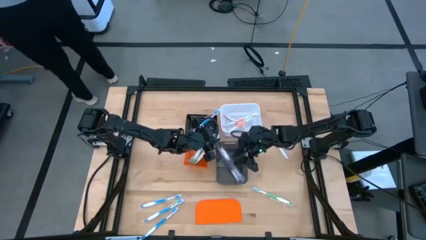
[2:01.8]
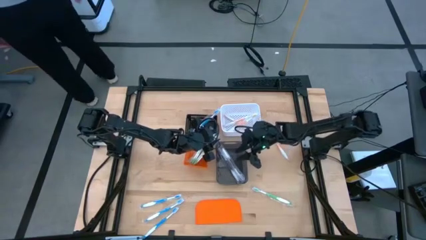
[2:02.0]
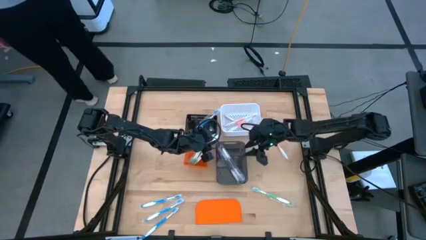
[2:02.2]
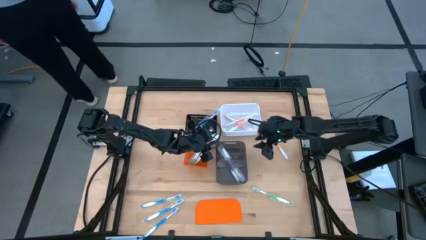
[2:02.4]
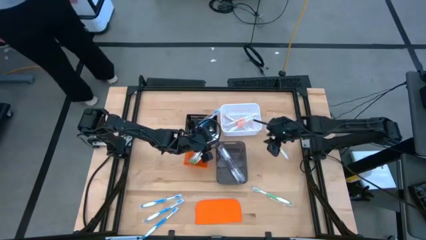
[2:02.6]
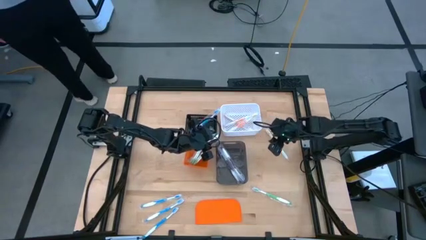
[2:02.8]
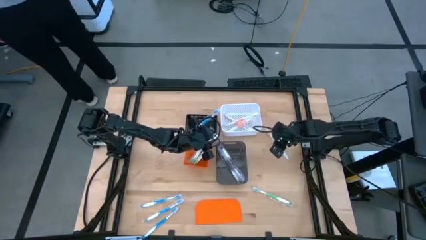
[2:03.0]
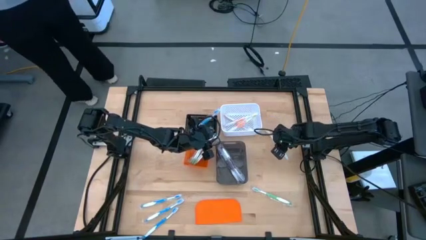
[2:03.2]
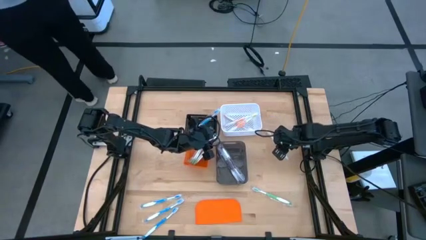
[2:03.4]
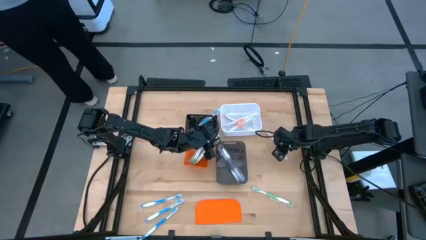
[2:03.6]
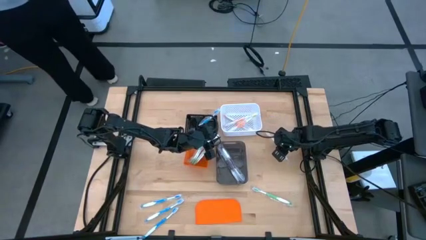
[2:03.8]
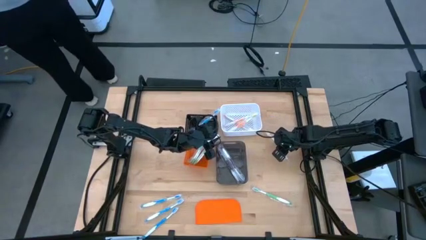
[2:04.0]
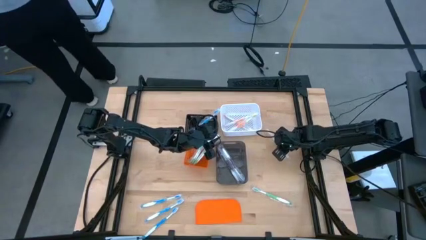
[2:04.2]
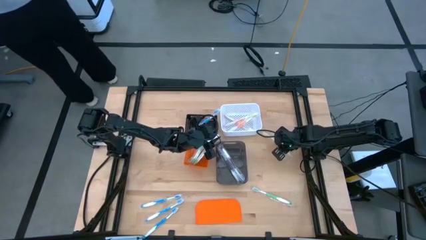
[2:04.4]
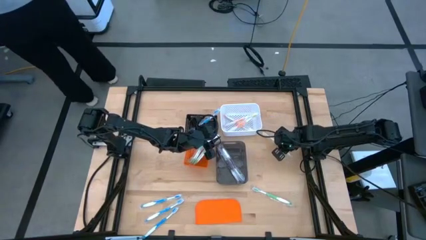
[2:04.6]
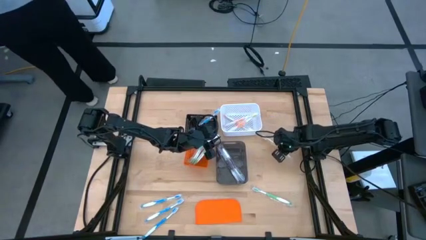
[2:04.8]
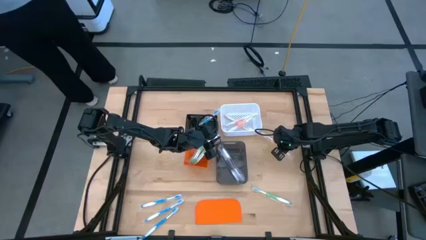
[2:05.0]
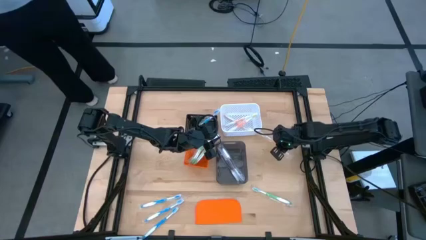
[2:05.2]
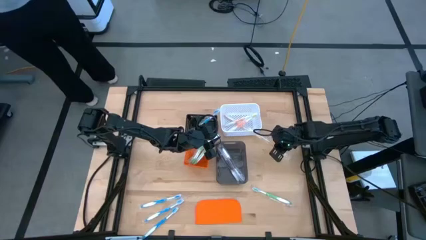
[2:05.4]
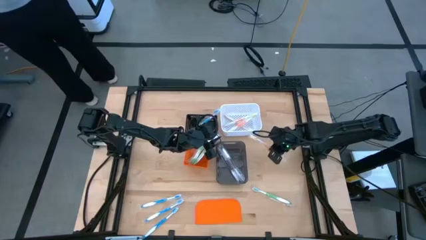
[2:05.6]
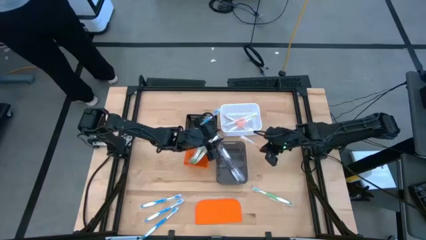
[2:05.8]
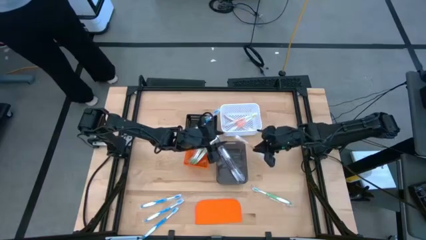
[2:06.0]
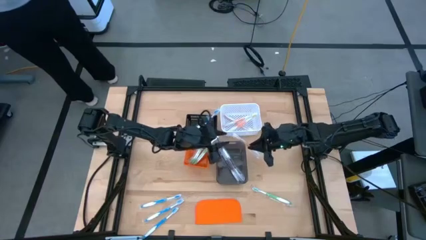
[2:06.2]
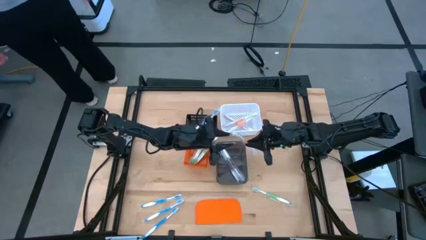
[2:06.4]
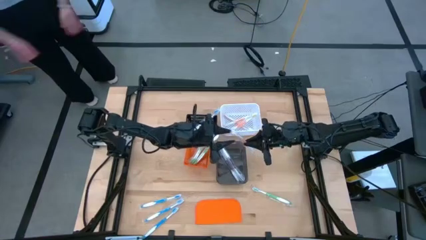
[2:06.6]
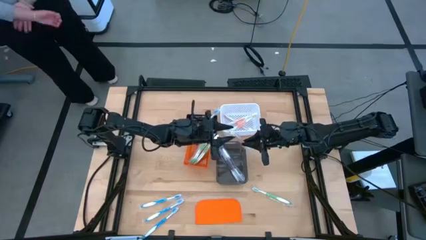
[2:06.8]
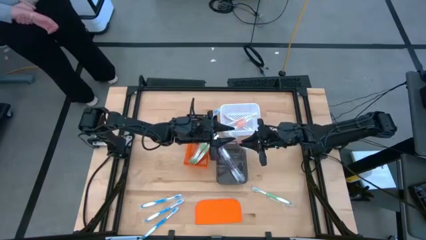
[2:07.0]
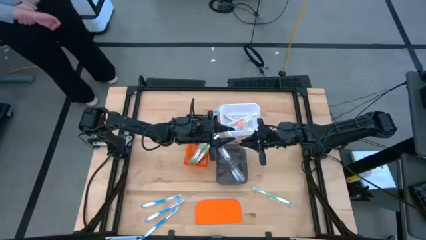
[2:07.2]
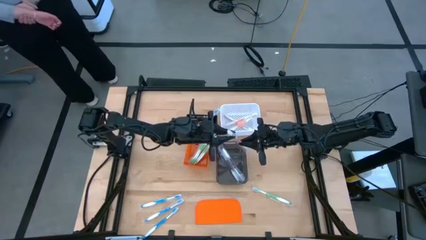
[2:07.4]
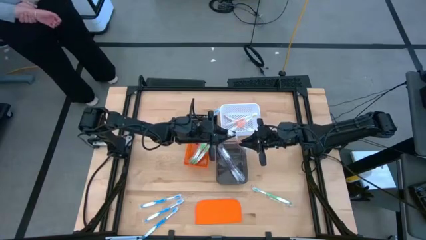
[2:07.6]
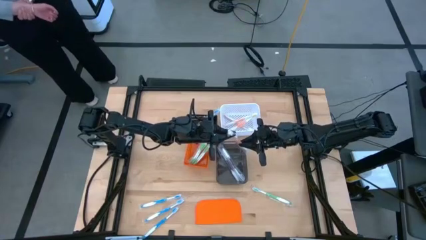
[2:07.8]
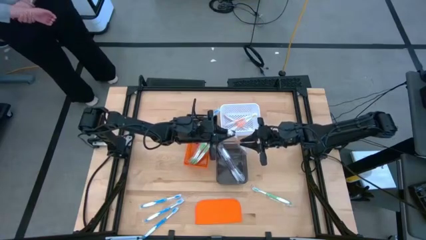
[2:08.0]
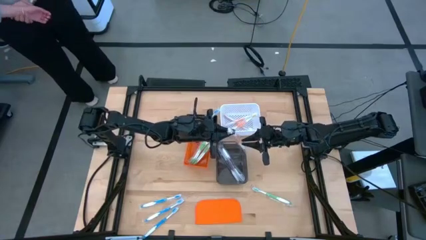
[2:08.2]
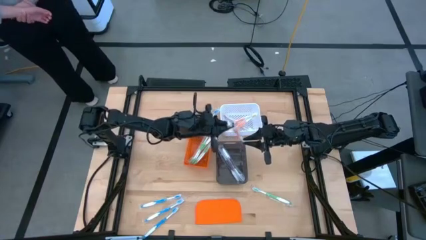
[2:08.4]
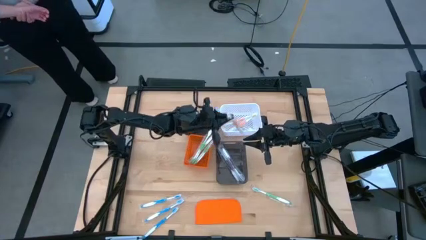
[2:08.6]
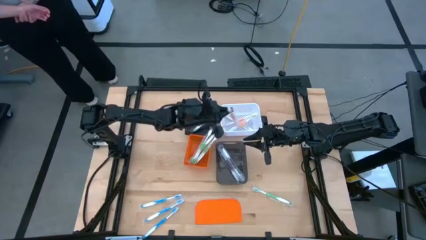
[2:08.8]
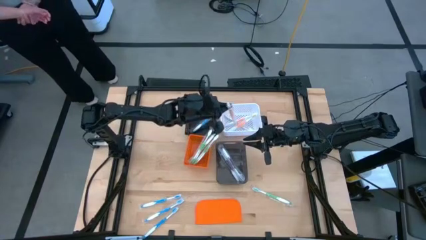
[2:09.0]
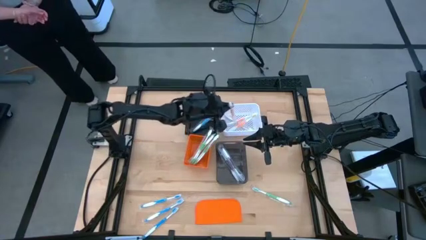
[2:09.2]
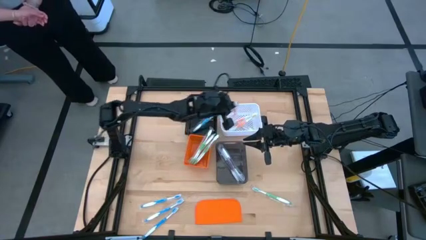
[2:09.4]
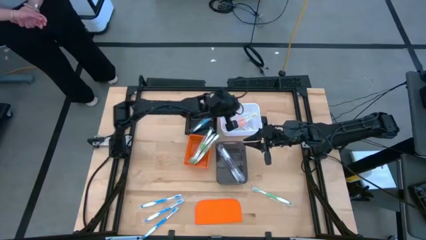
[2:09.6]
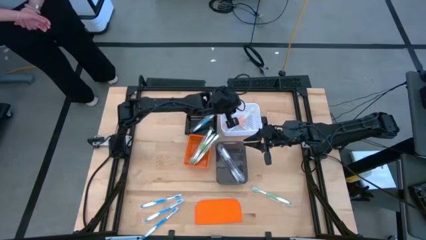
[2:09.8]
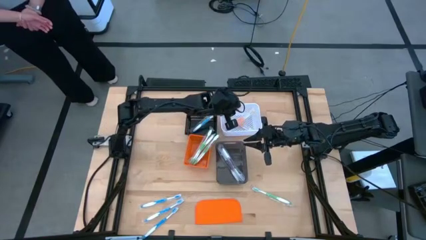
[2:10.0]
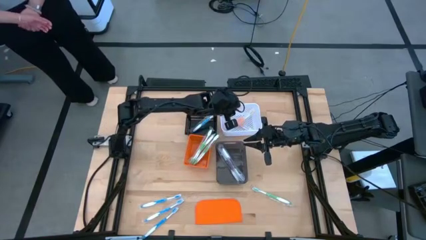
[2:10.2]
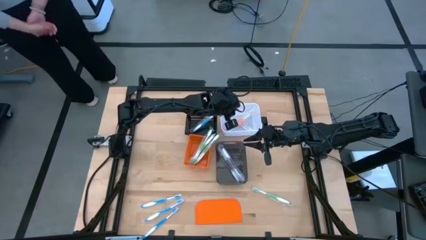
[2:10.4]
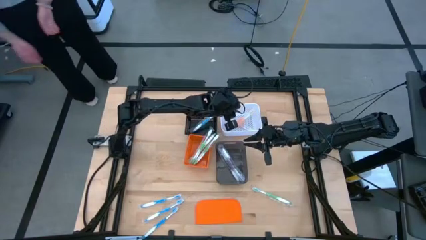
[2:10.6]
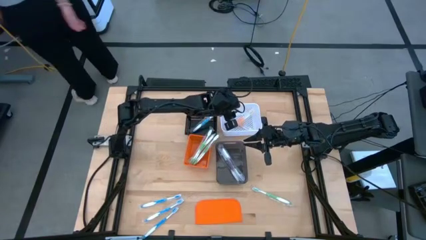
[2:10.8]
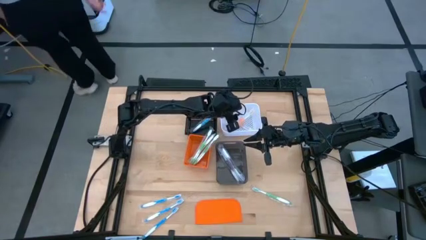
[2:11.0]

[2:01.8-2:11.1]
Task: Pick & Place Toothbrushes
Put the orange toothbrush into the white bin

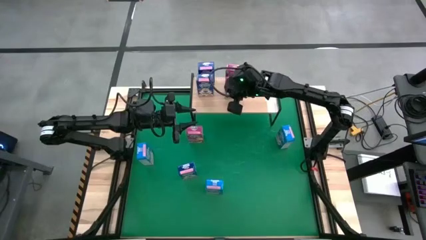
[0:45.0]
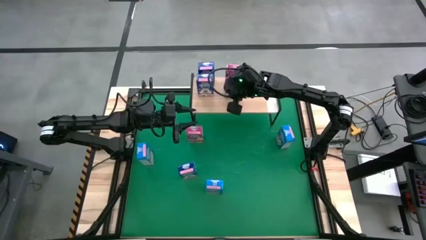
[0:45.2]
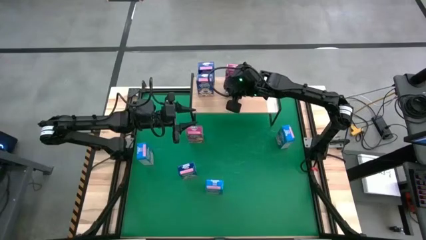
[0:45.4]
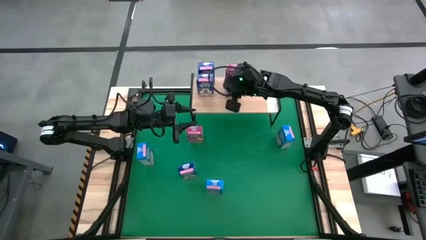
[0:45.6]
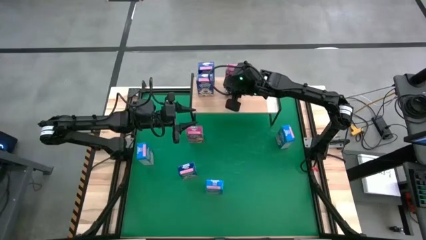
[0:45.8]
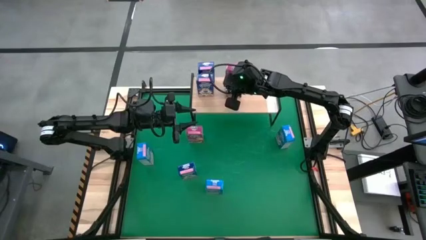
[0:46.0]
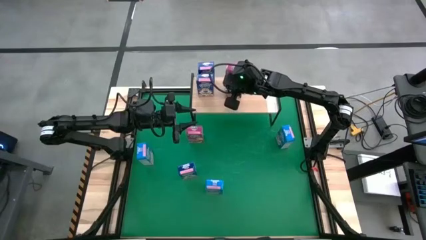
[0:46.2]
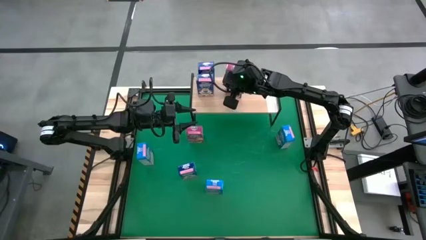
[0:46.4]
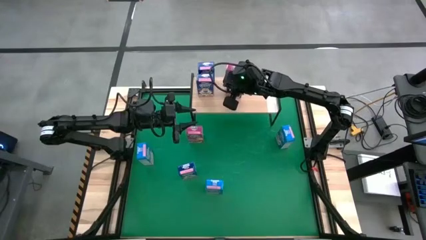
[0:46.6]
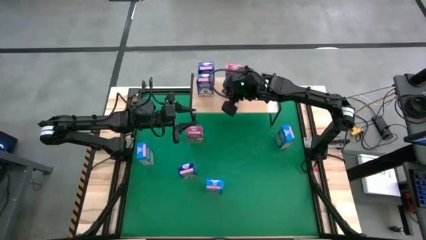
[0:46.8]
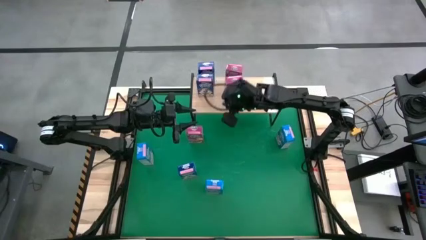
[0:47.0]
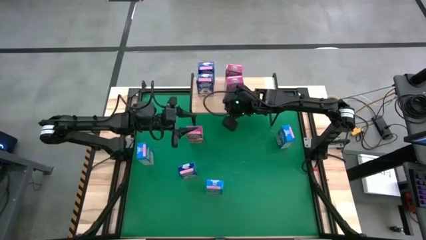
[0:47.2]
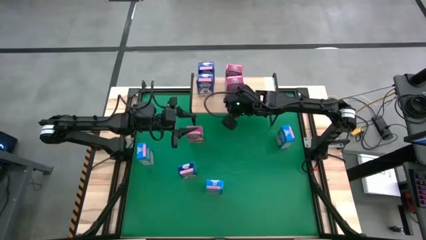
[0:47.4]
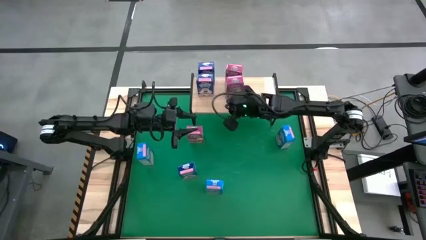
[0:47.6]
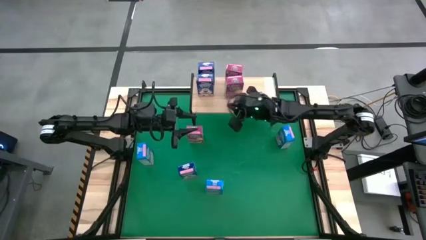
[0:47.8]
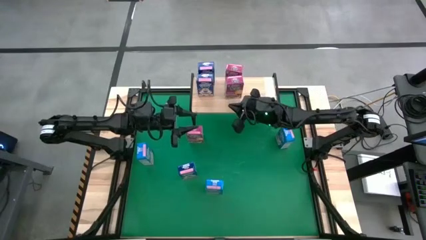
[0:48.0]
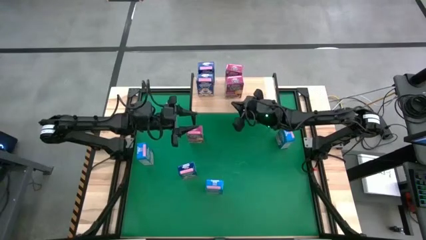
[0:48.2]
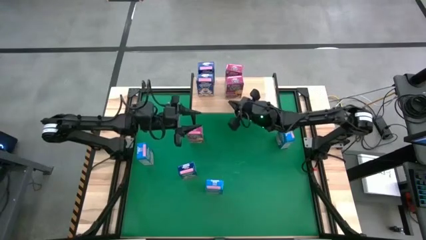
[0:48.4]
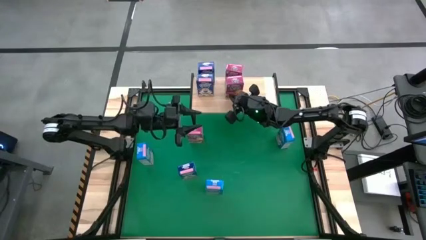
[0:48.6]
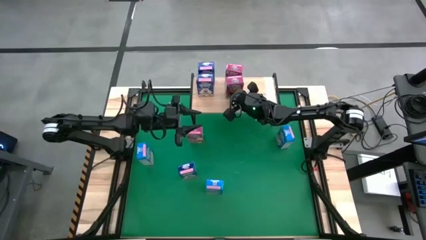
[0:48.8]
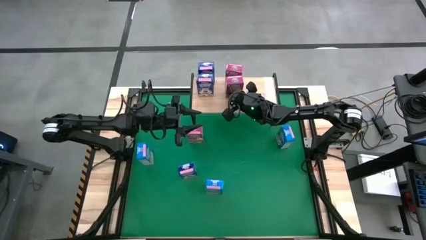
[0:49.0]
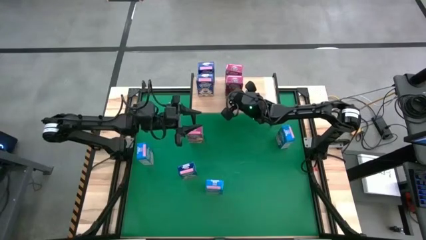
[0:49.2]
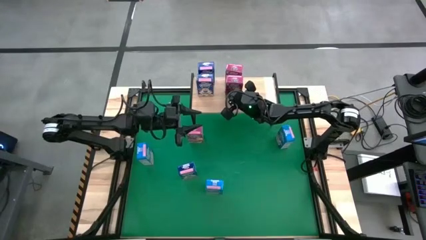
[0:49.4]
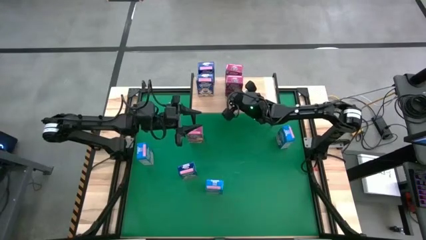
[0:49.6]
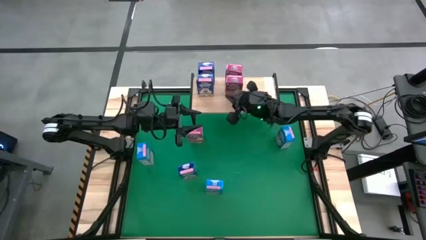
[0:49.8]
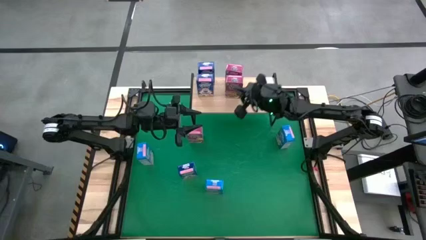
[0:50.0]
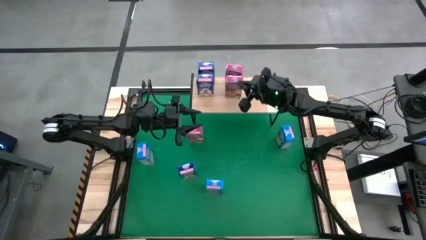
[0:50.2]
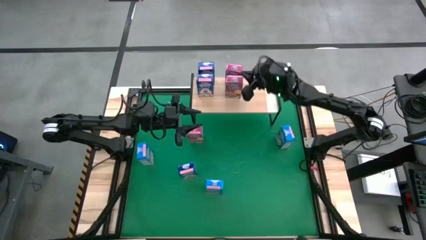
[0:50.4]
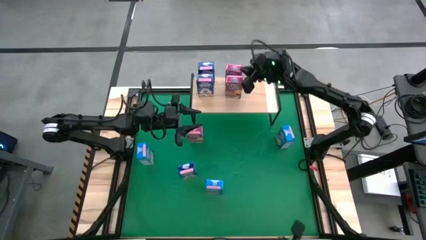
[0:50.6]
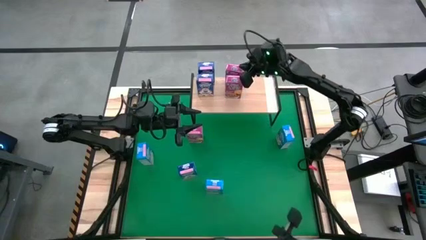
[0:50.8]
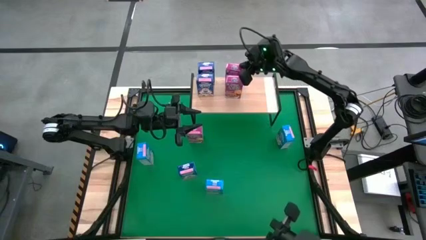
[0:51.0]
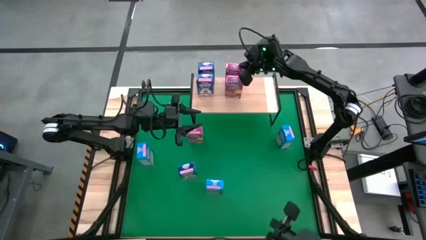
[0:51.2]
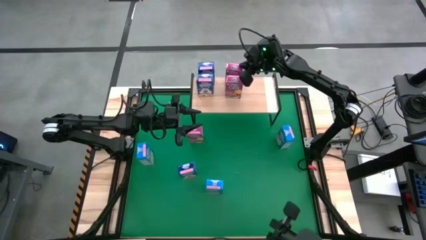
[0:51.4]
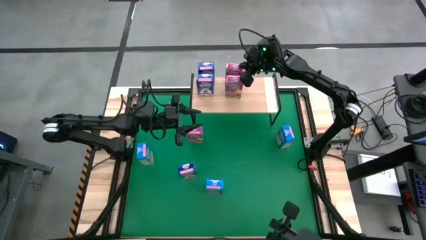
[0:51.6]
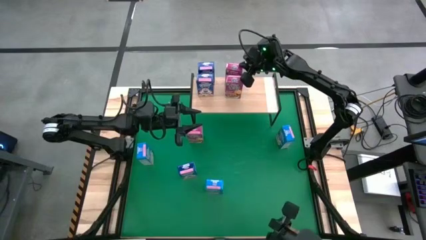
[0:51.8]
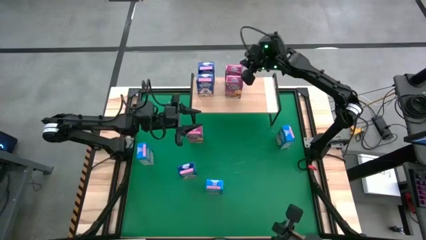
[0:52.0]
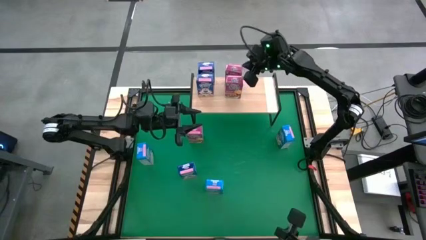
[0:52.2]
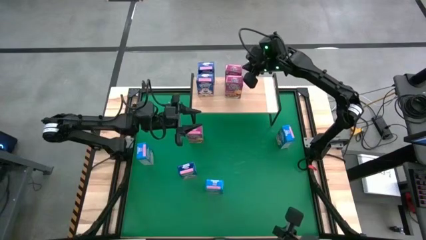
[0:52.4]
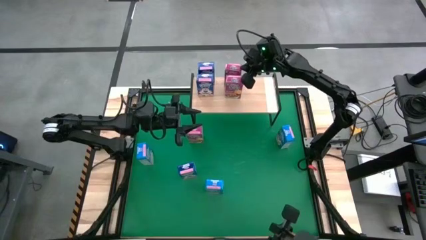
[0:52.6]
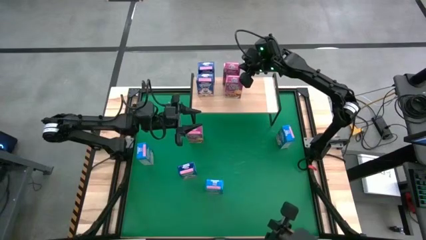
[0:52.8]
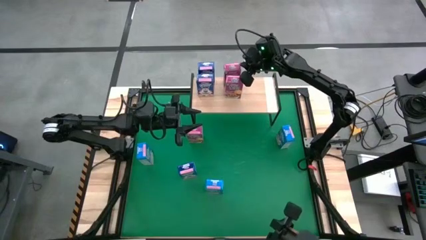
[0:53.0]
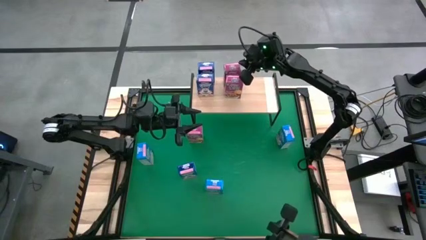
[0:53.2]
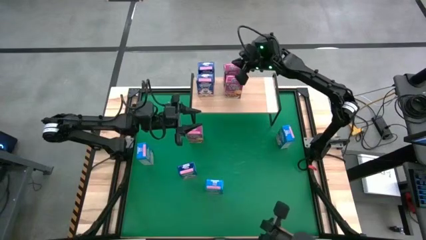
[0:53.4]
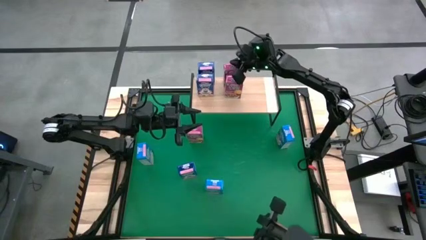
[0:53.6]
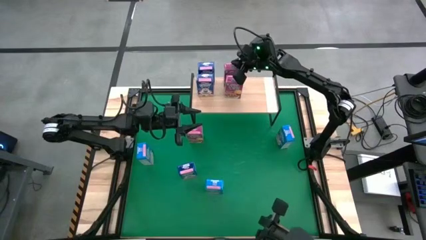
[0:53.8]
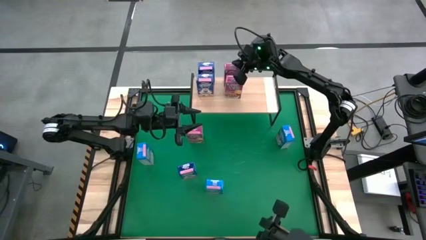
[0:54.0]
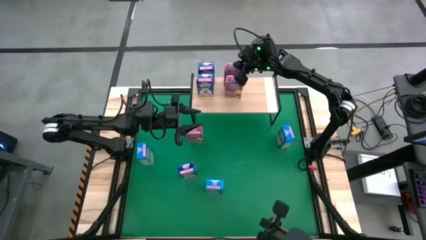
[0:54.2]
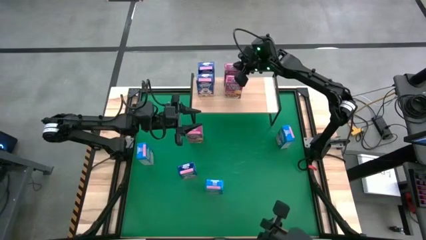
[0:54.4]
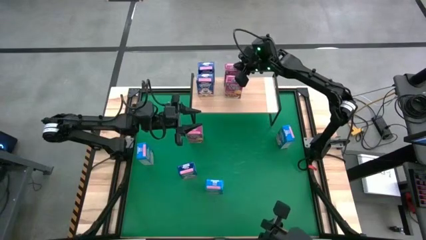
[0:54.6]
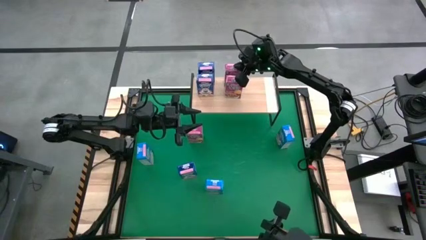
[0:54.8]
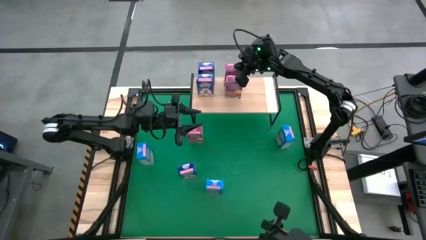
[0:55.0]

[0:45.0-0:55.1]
Task: Stack cereal on shelf
Put the right pink cereal box on the shelf aligned with the other pink cereal box
